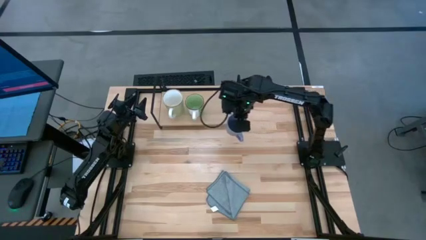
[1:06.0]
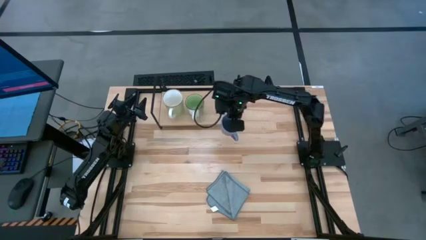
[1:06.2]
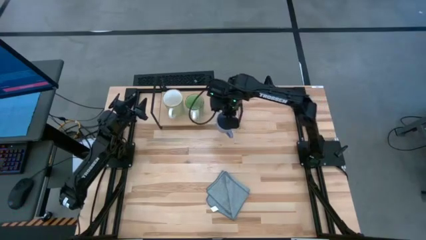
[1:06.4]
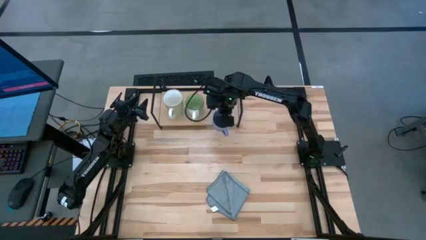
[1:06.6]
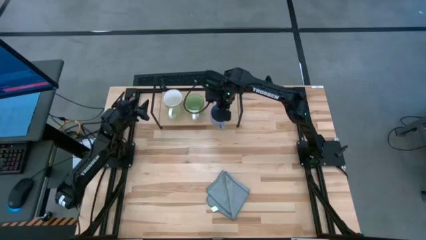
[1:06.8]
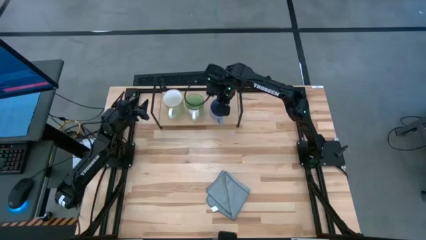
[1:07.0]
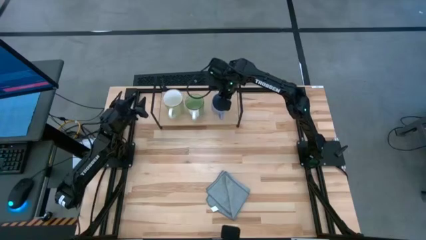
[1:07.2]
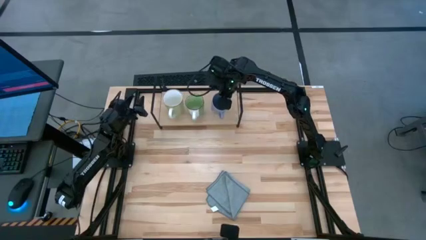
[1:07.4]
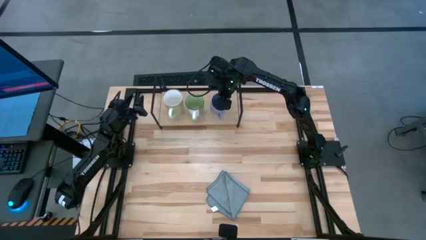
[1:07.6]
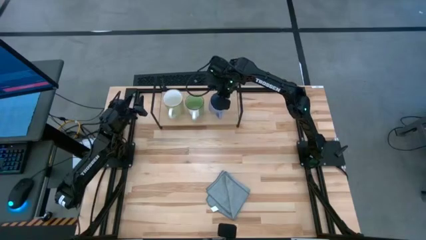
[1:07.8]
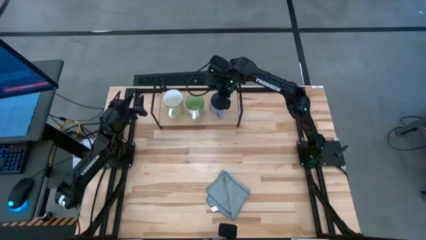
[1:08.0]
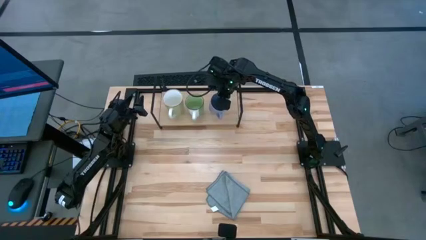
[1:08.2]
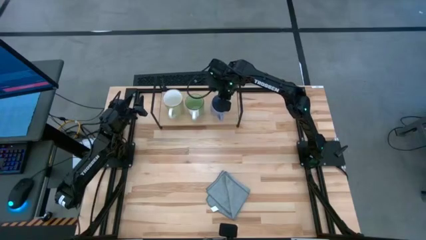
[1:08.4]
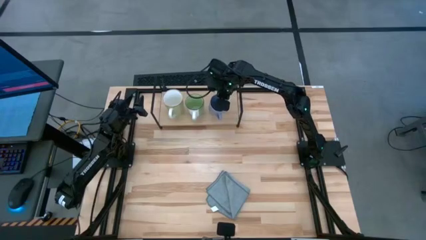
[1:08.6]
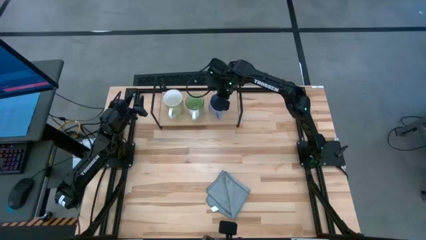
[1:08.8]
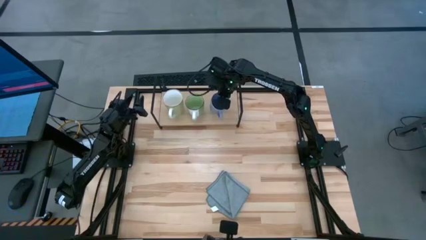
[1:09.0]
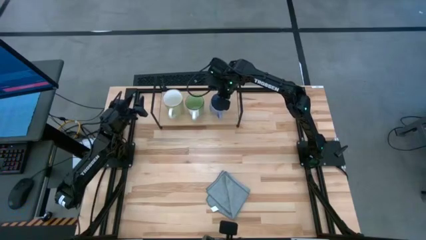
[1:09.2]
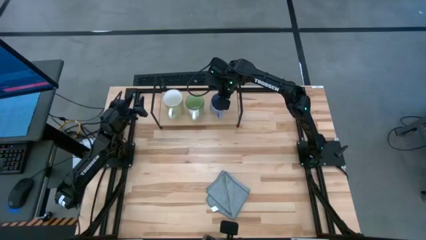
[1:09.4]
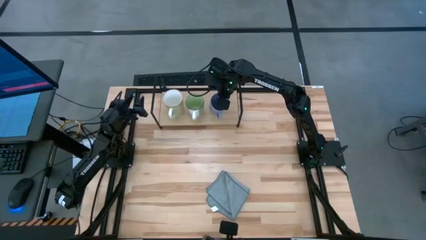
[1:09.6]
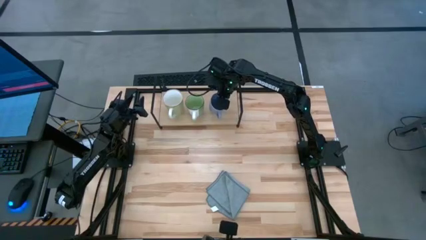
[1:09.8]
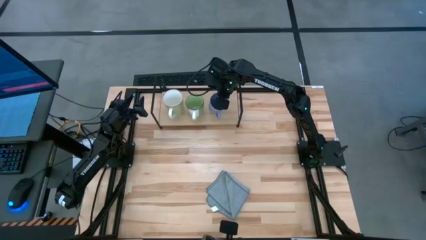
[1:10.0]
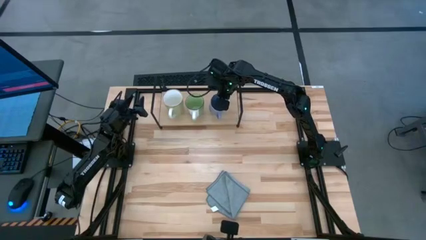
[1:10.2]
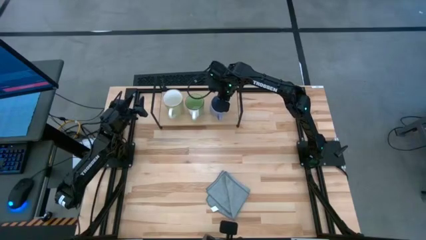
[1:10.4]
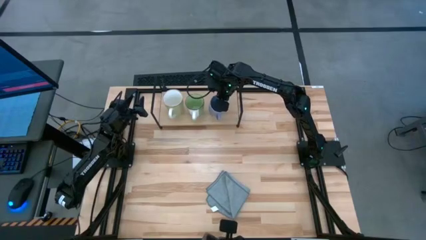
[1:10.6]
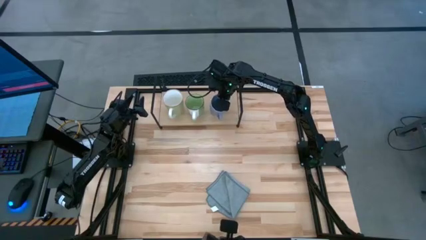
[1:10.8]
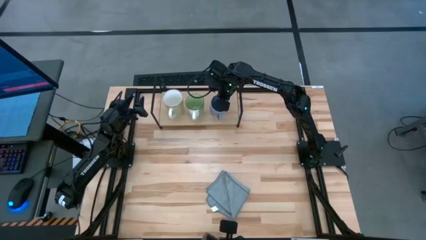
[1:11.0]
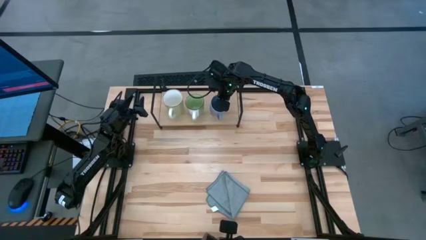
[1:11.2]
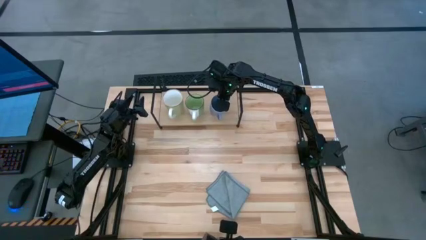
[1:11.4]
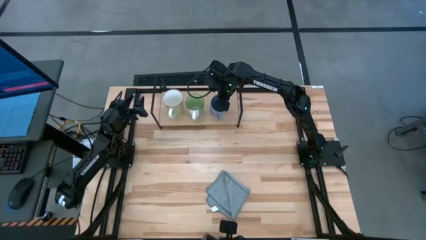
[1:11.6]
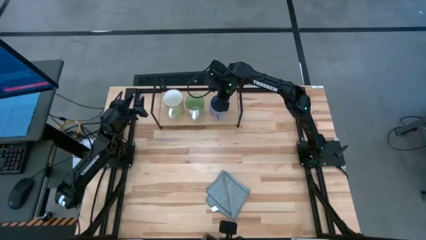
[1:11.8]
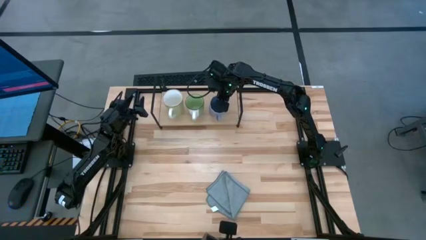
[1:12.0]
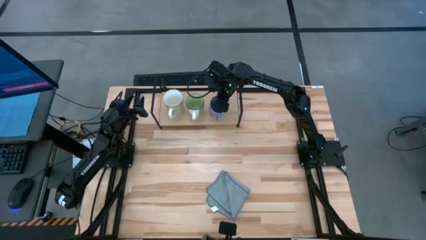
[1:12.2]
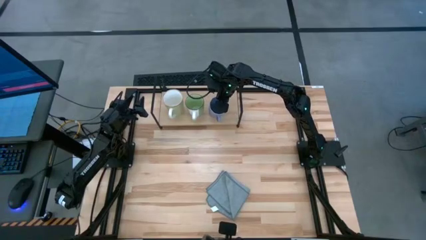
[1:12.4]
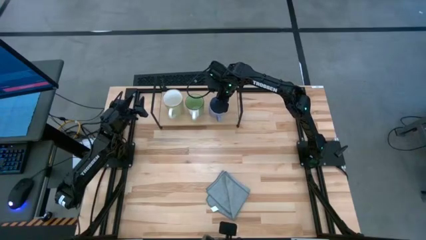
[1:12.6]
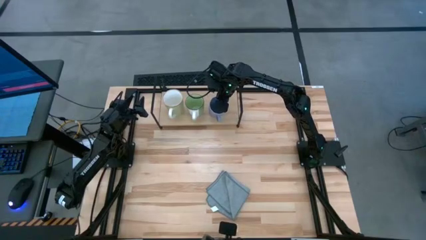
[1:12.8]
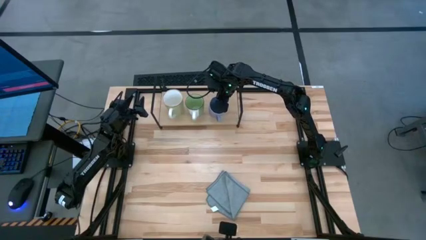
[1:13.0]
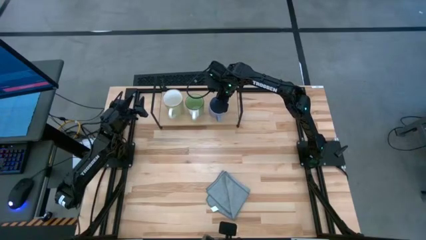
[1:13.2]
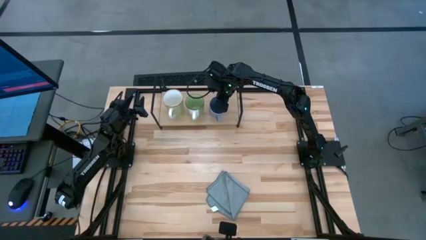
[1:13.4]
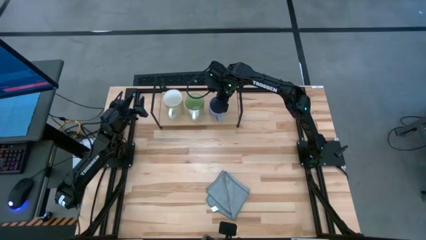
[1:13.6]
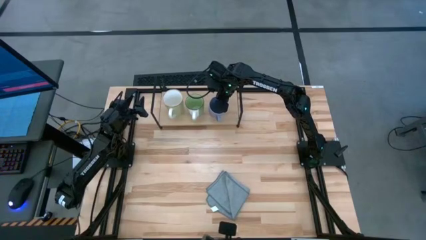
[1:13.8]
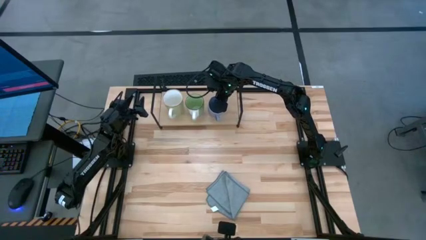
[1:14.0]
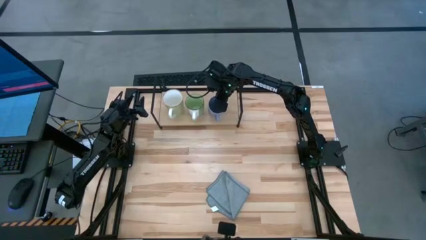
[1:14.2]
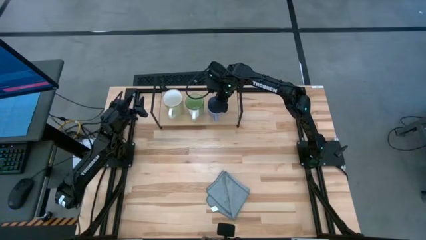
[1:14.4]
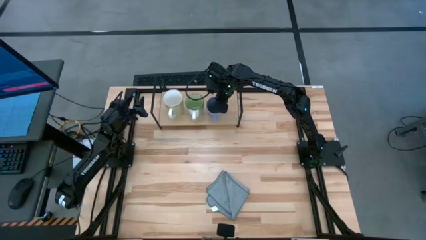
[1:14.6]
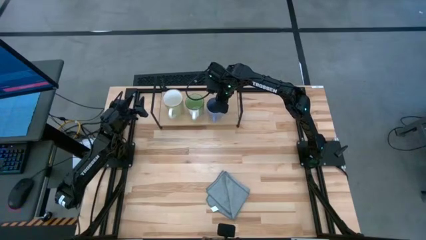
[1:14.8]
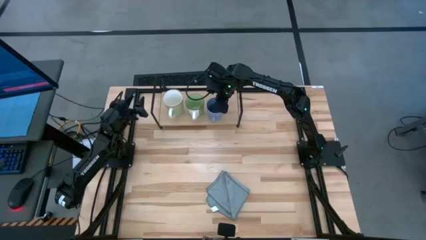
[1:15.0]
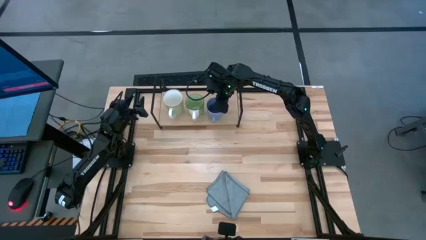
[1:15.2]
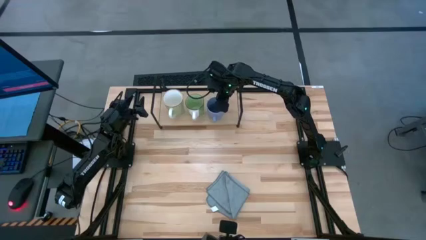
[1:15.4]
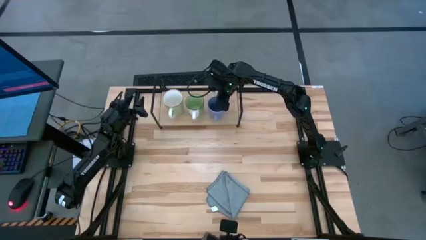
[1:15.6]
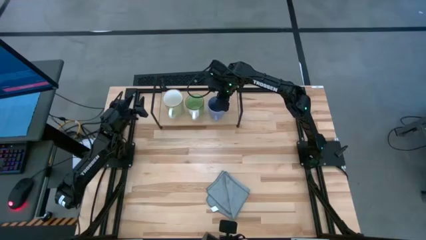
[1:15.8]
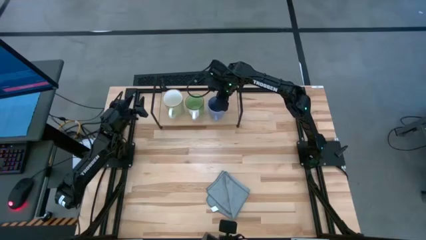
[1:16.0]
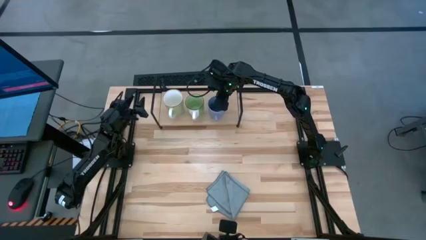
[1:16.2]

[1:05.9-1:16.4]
Task: Stack small to large cups/mugs on shelf
Put the blue mug on the shelf

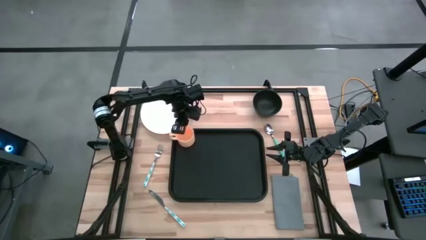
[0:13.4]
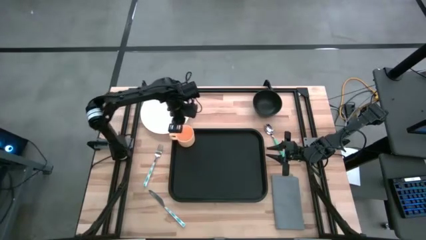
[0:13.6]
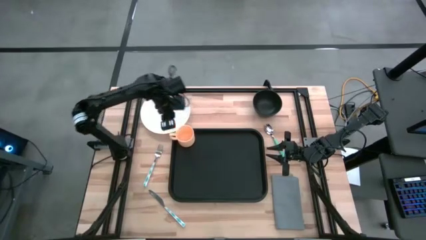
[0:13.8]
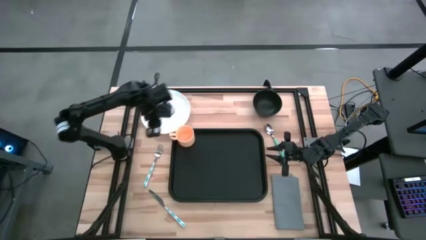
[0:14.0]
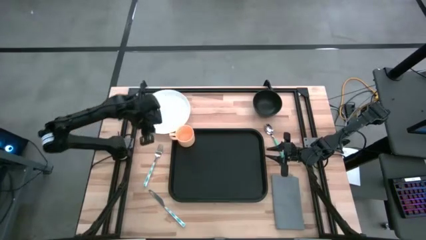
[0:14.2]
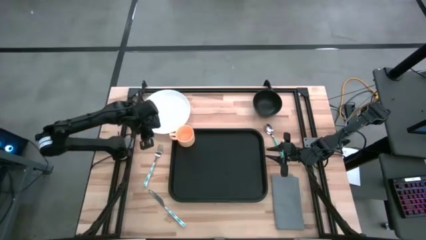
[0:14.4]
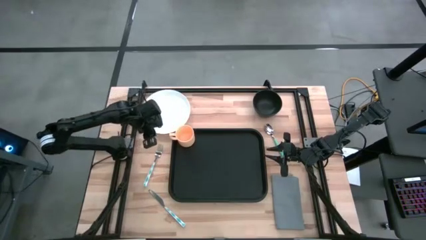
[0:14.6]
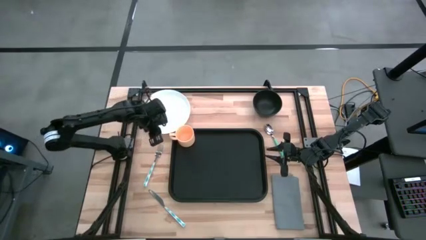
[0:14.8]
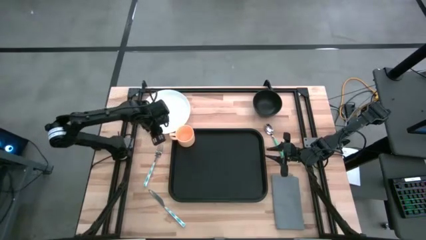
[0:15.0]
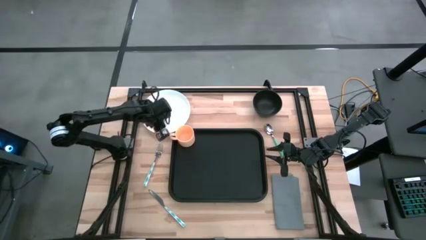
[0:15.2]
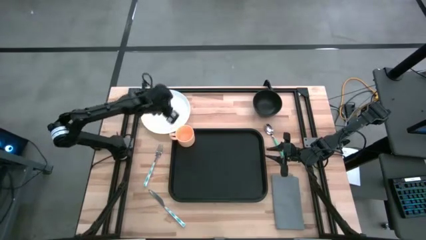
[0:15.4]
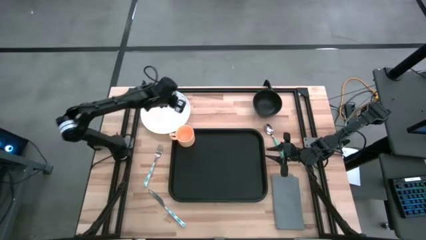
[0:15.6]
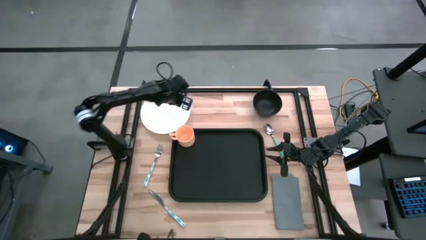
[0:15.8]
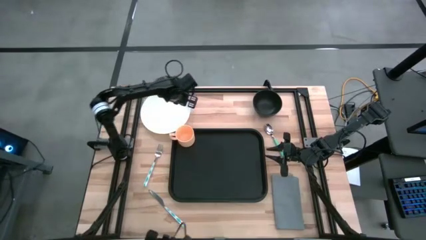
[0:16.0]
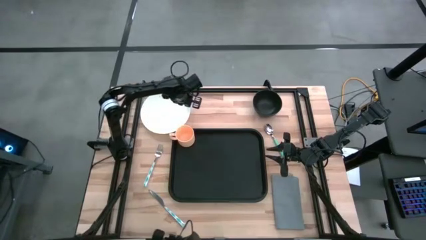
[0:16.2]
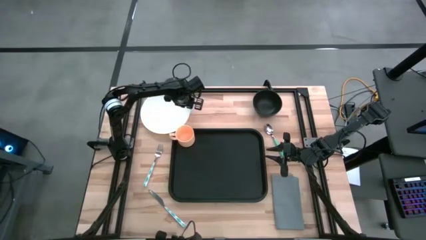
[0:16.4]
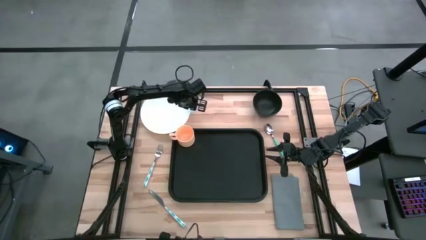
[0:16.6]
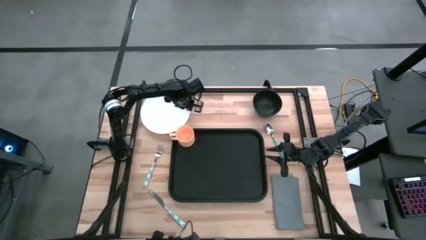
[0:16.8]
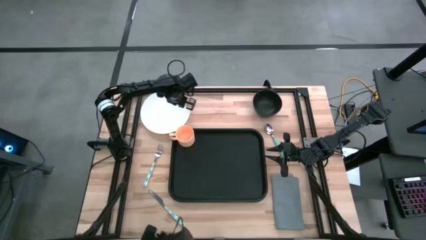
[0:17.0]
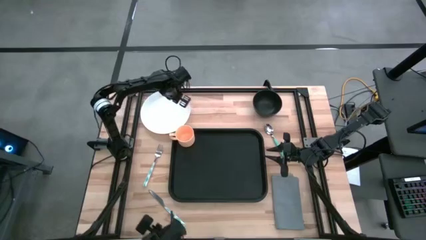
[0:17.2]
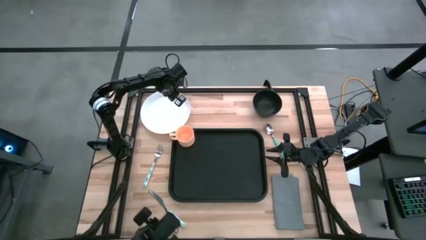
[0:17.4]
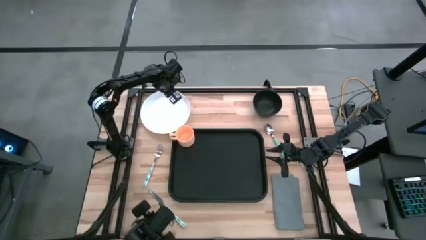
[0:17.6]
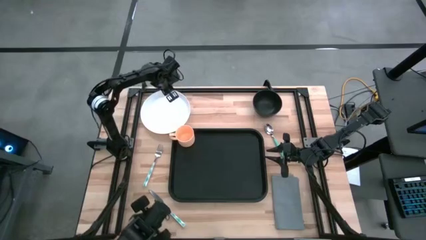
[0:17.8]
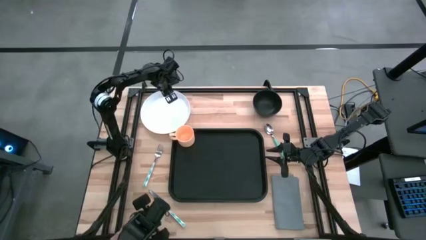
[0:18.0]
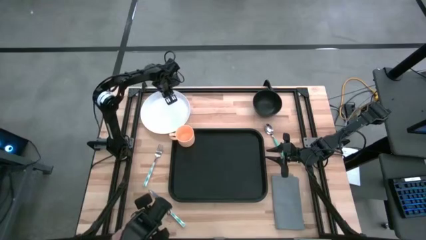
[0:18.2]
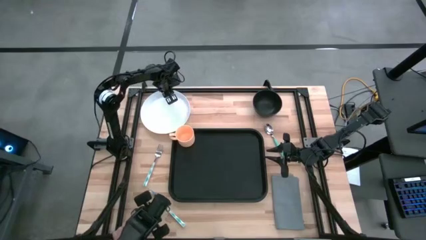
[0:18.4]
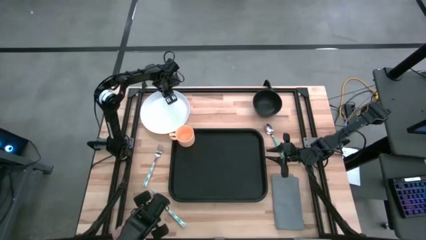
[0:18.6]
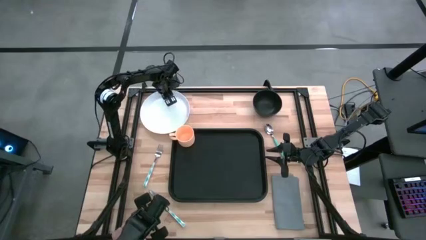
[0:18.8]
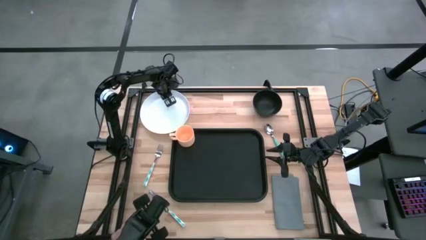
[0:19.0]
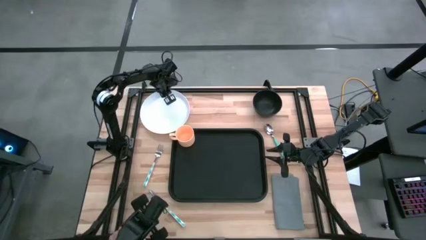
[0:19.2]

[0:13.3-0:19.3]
Task: Set up tray
Put the white plate on the black serving tray to the bottom right of the orange mug
